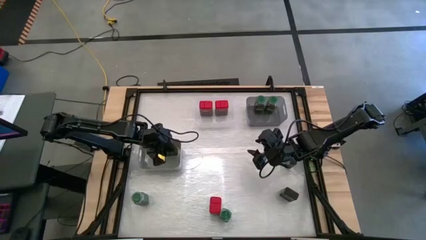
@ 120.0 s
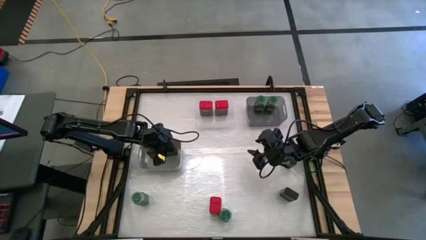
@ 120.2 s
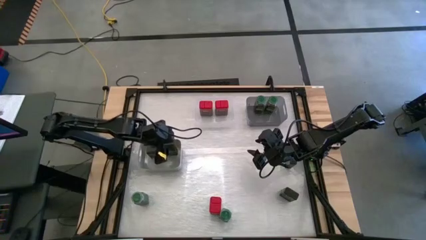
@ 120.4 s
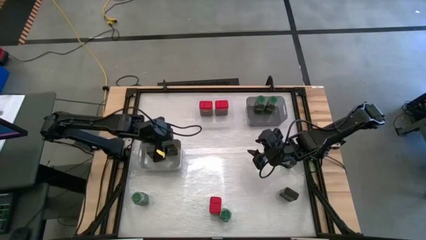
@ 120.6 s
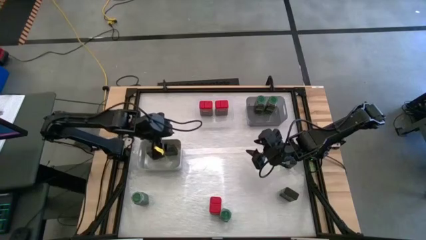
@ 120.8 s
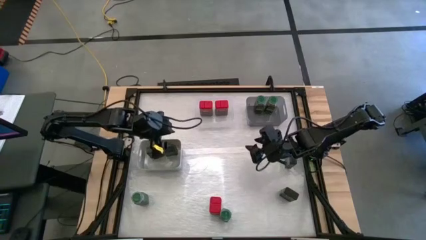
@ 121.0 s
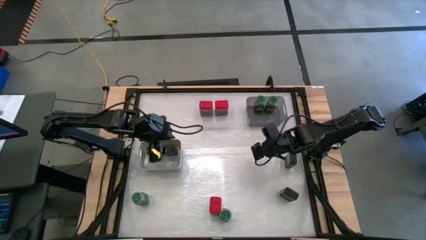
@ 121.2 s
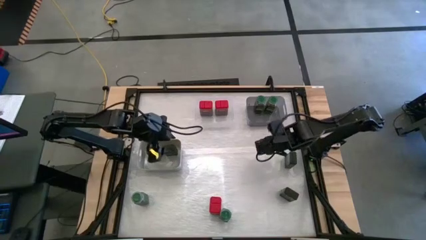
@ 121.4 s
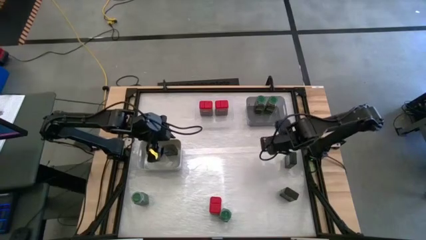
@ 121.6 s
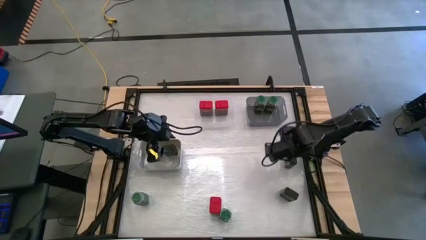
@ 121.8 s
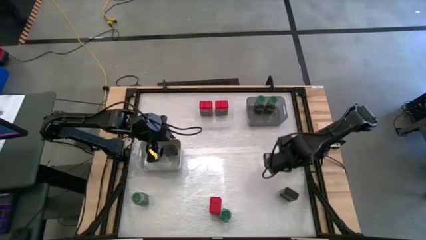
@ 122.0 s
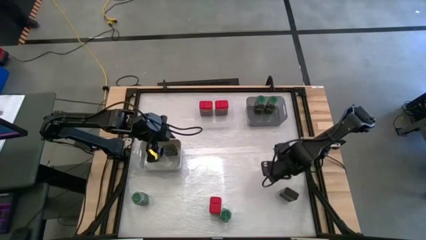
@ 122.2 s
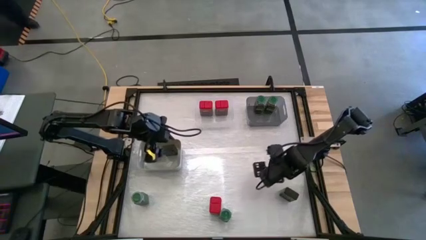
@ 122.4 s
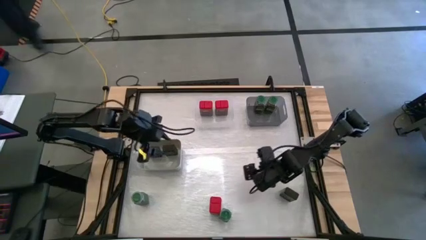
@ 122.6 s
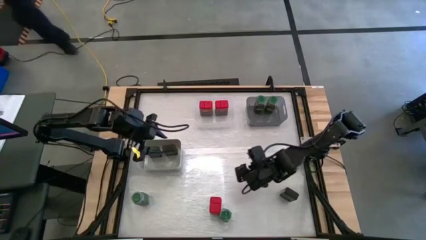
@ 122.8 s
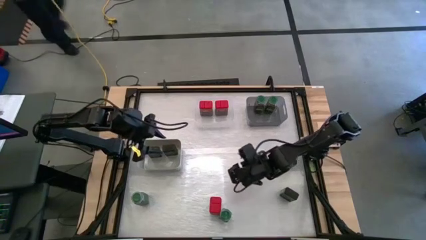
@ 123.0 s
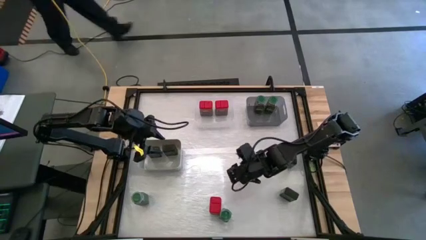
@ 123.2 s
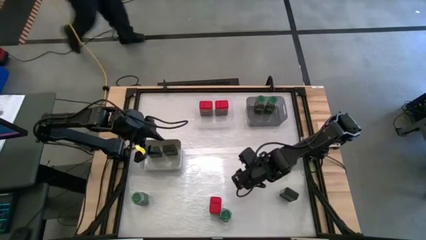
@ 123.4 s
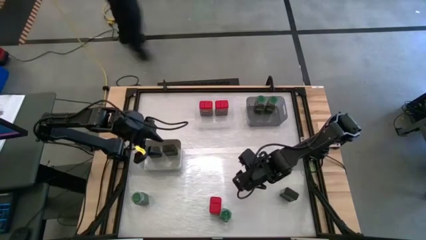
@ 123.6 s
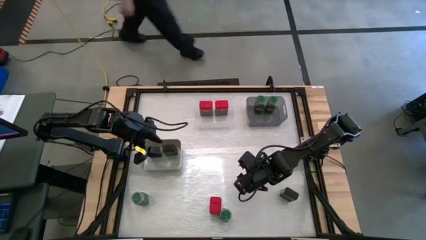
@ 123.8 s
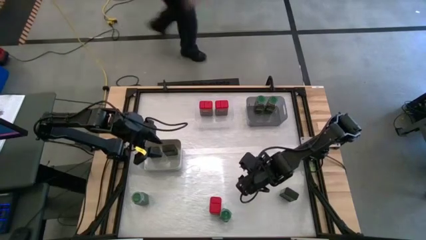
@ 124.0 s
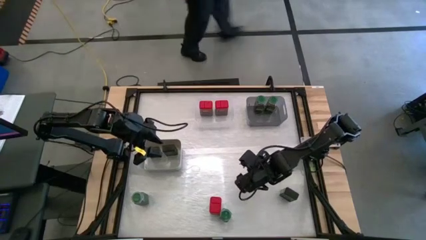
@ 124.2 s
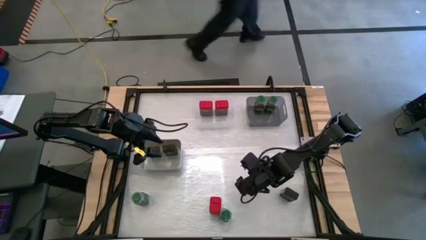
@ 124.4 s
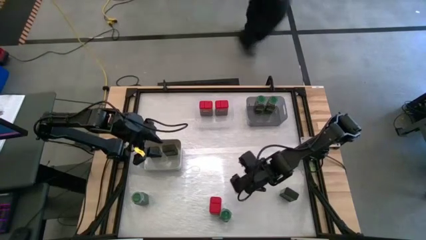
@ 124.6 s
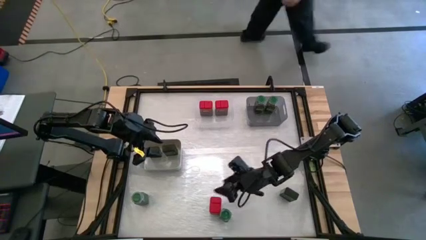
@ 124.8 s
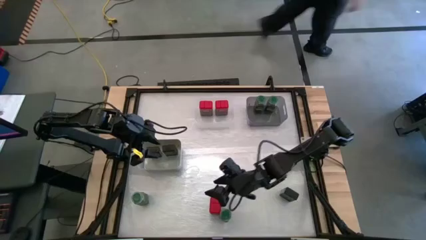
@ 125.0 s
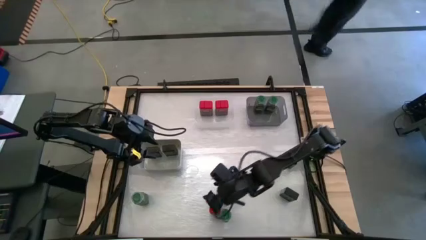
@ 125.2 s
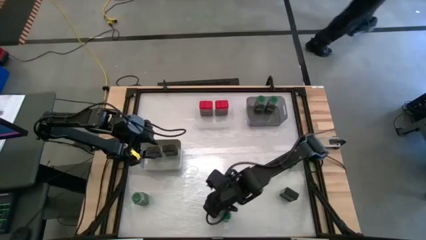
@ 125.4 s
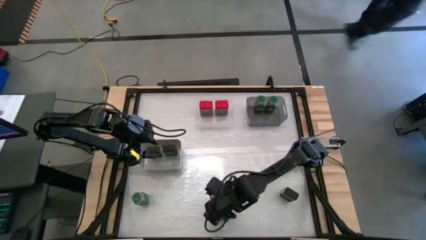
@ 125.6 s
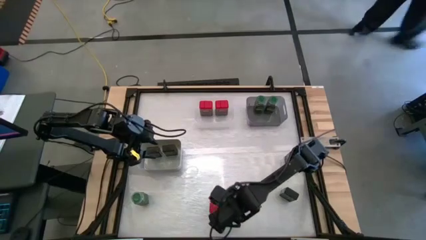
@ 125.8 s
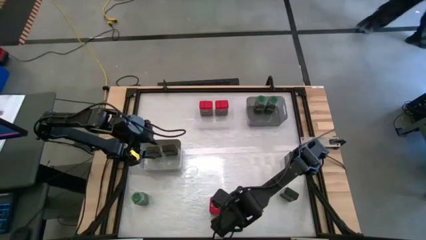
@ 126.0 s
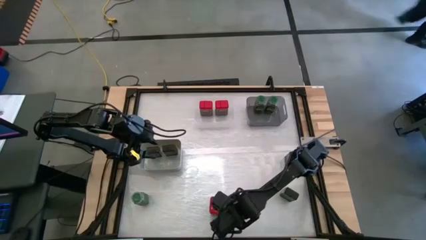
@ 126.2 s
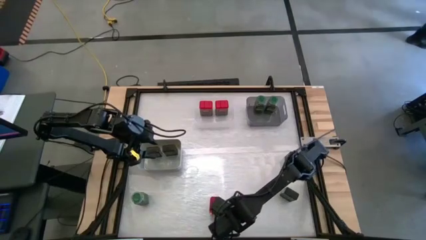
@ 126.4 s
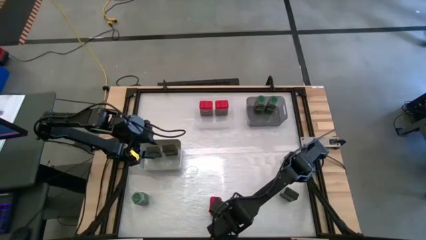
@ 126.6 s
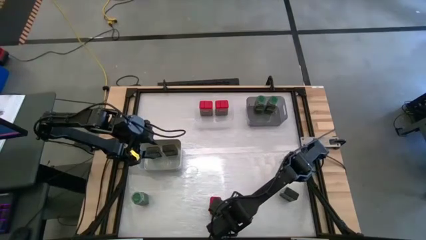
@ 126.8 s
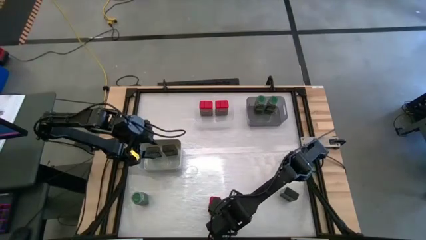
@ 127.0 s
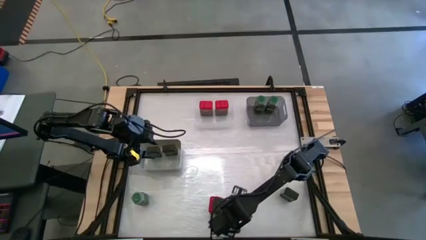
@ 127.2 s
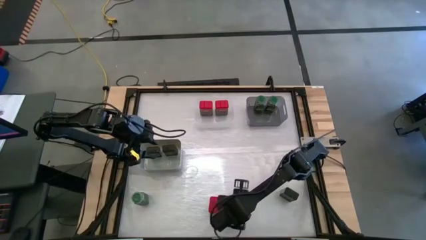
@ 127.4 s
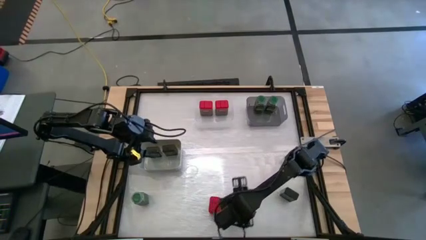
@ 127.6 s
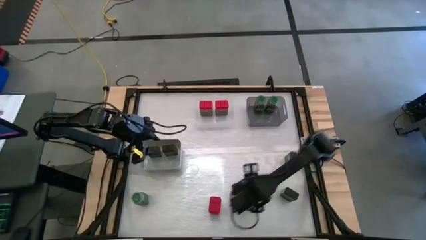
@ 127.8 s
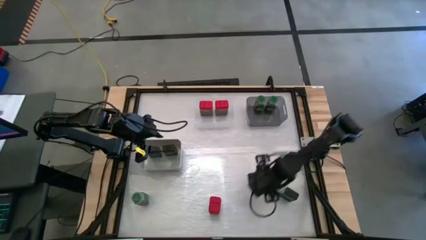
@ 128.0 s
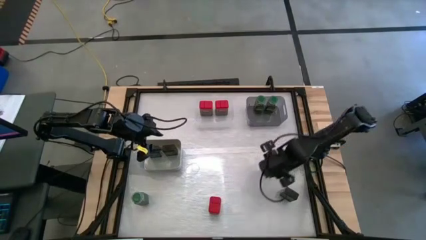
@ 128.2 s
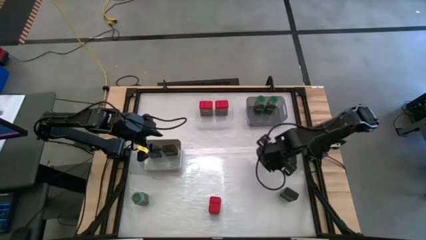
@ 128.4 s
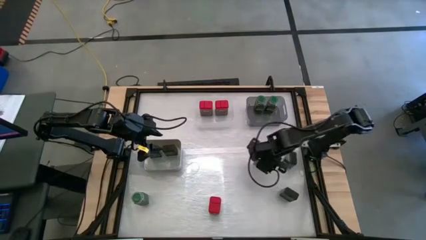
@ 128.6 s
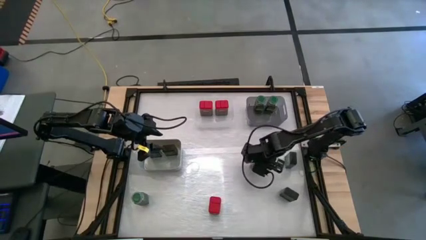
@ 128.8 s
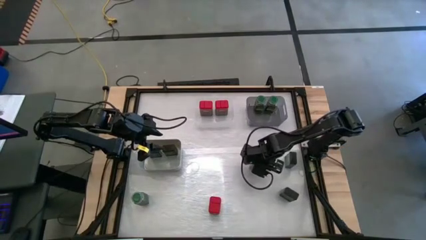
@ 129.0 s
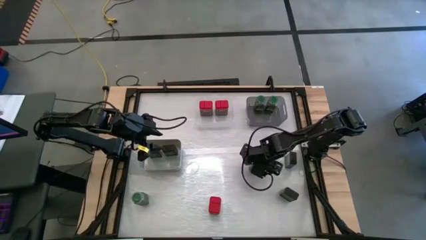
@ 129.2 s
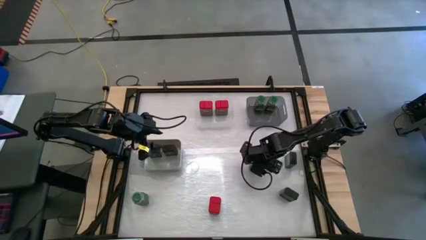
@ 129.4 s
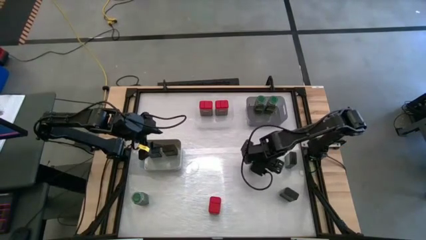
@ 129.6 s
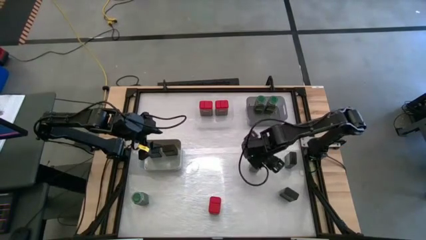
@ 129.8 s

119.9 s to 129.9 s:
Task: Sort spices by type
Put the green seasoning bottle into the black bin

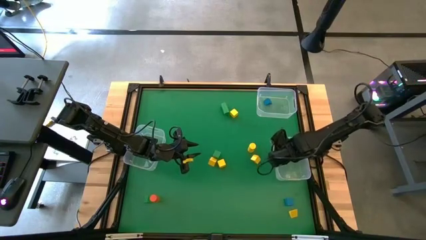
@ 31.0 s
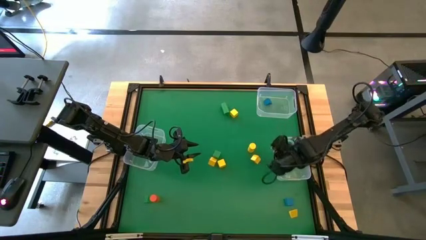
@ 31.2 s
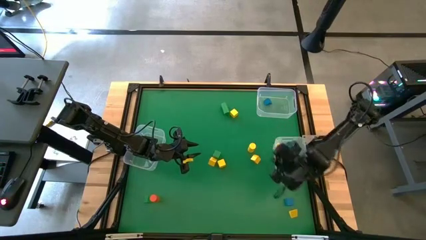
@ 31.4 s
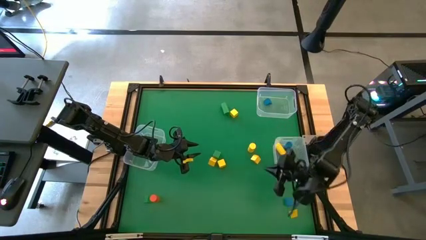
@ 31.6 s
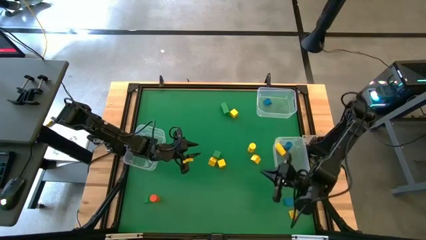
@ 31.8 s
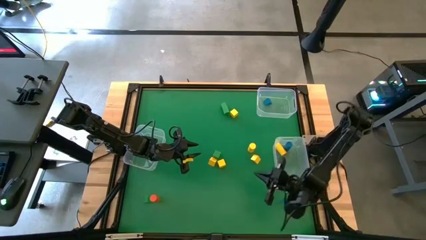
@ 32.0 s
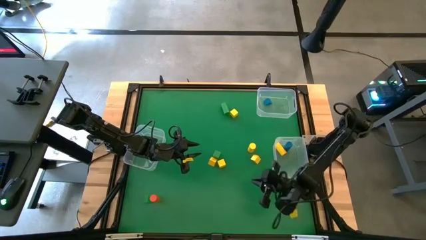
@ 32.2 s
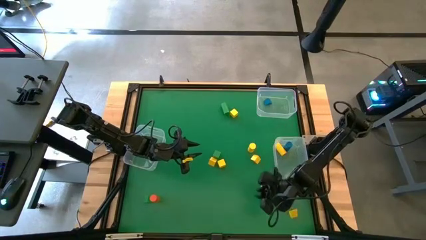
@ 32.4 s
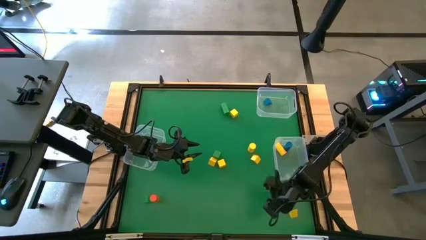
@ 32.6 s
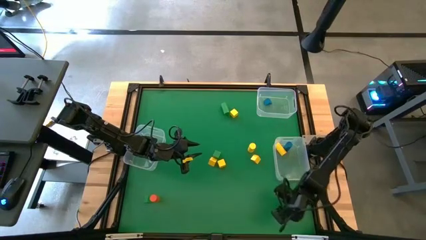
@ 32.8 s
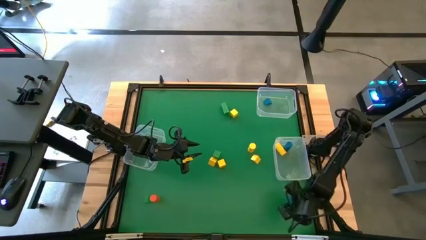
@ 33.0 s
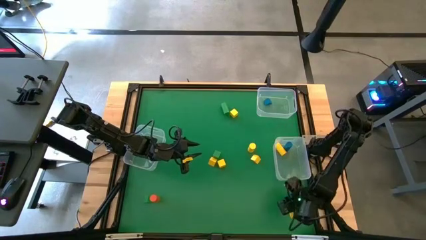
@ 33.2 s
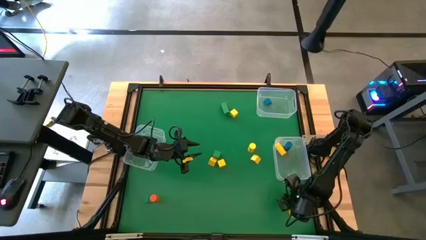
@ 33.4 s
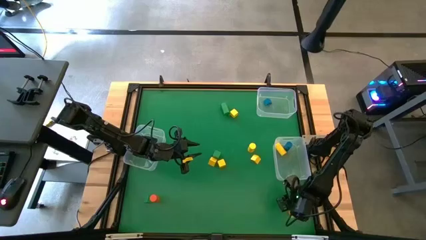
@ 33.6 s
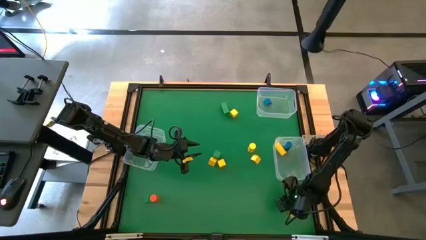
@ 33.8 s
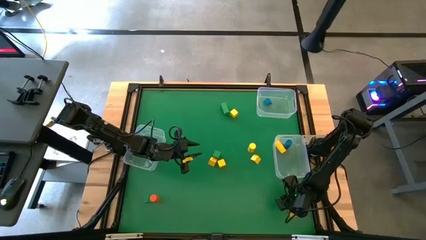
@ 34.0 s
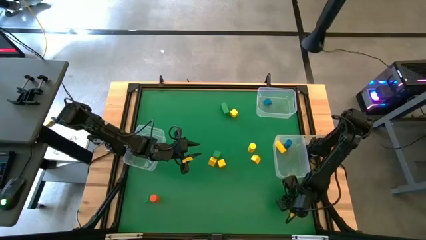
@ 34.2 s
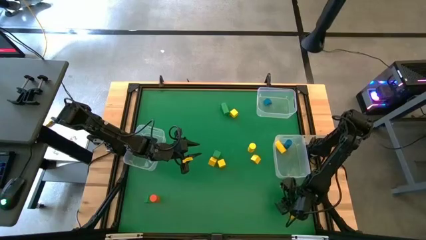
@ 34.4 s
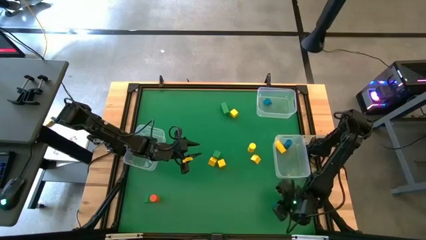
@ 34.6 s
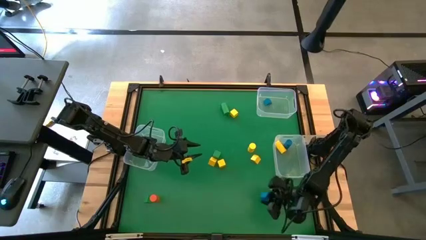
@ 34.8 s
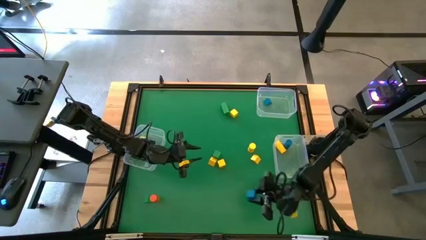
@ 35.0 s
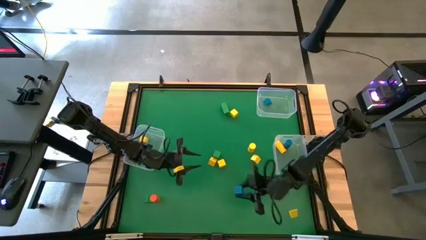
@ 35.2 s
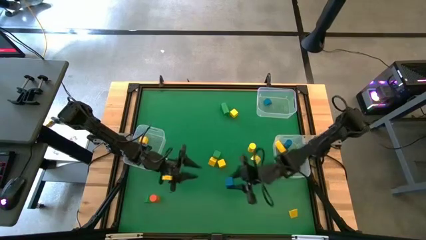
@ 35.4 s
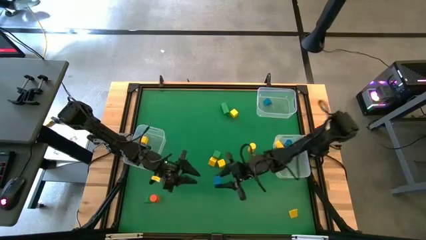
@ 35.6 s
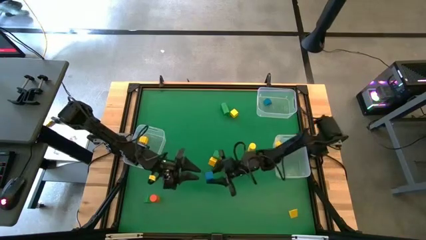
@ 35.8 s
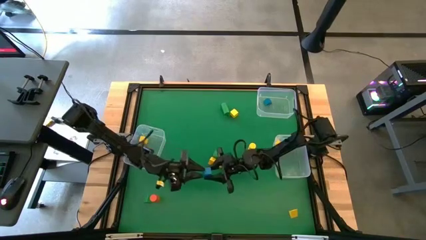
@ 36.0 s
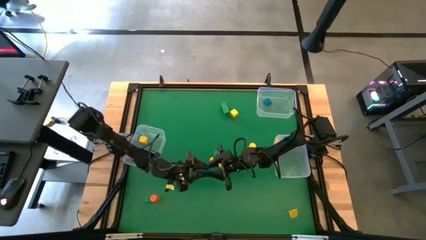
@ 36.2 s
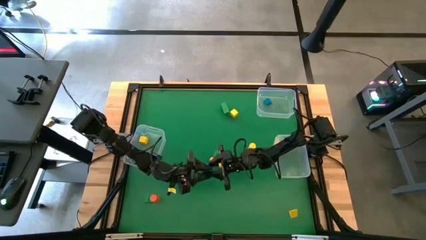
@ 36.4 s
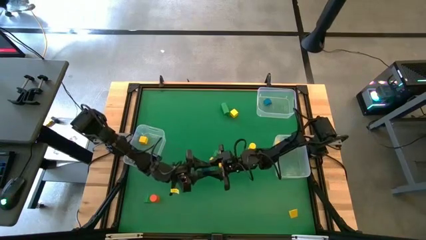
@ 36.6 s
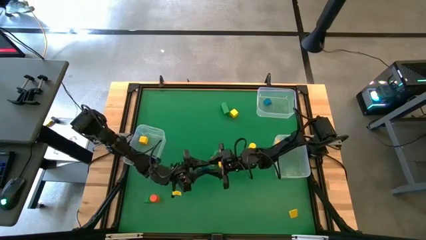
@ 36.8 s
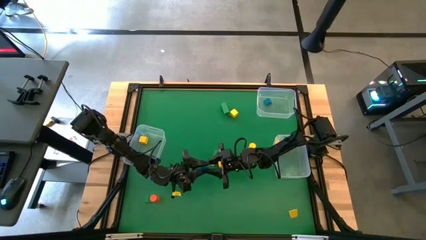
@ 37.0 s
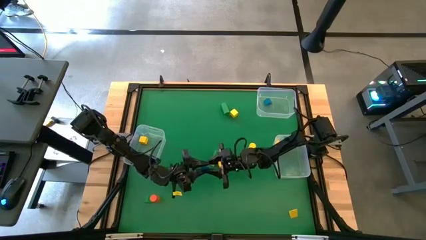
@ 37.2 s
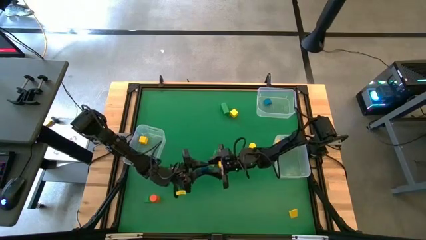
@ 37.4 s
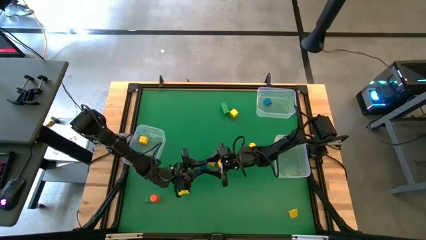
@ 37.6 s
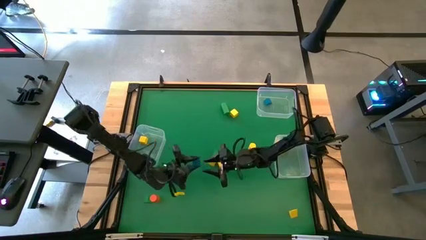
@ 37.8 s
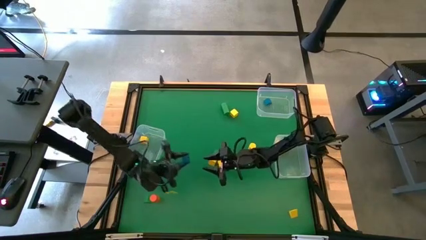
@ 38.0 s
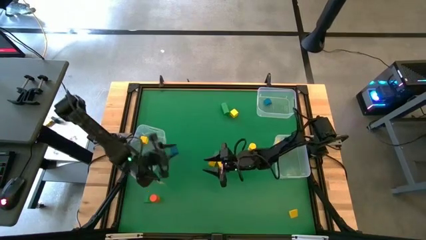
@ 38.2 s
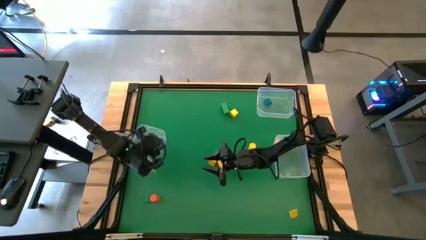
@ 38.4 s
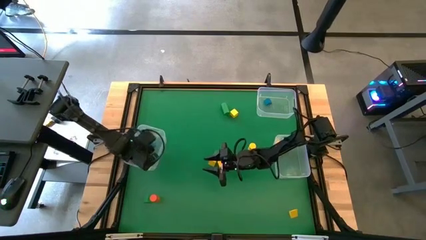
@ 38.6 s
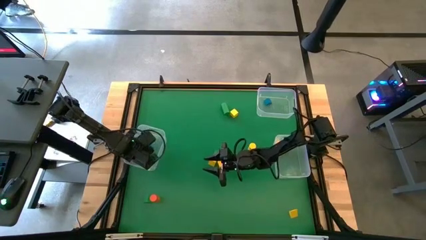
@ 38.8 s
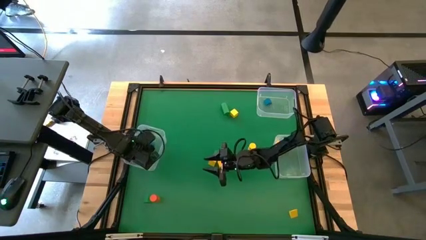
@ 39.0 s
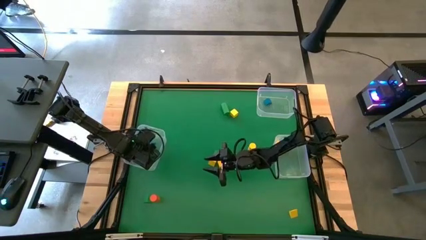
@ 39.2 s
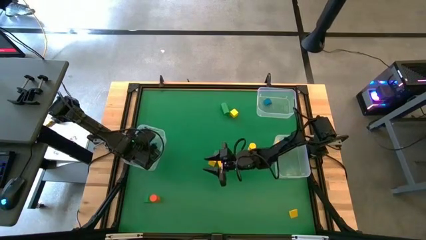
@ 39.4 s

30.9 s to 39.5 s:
Task: Sort blocks by size
Put the blue square block into the left transparent bin
